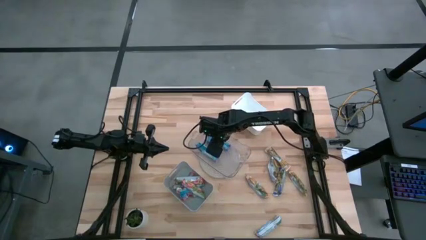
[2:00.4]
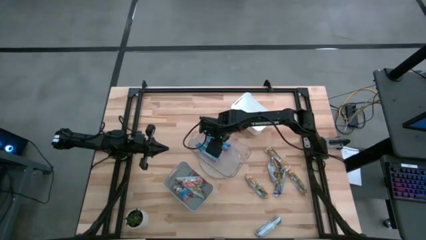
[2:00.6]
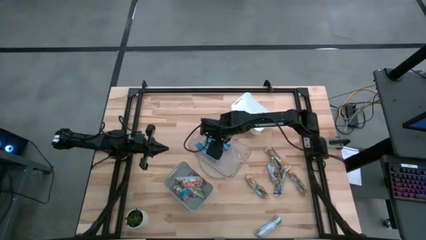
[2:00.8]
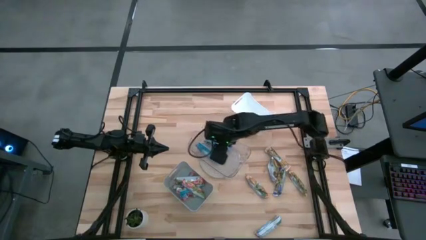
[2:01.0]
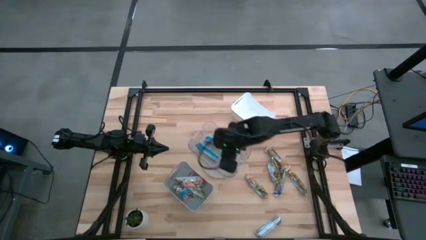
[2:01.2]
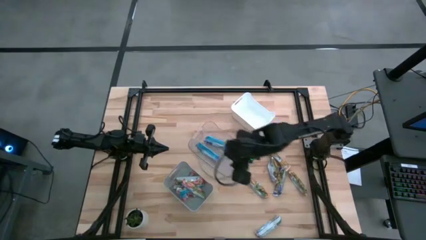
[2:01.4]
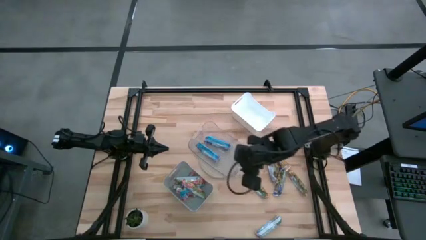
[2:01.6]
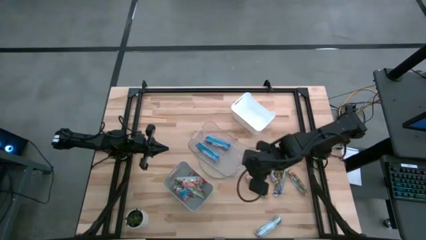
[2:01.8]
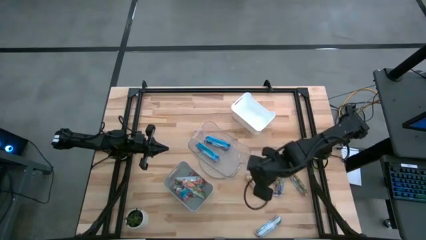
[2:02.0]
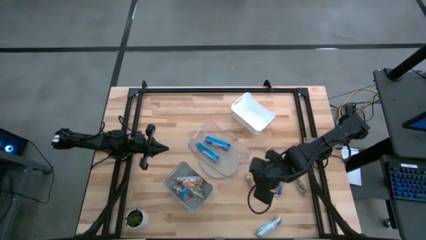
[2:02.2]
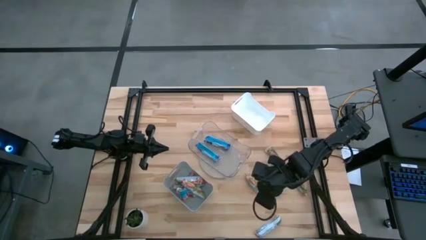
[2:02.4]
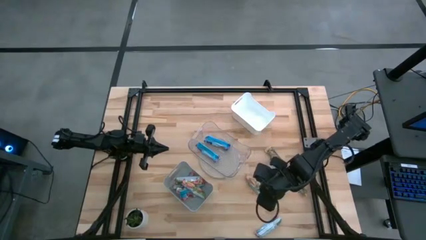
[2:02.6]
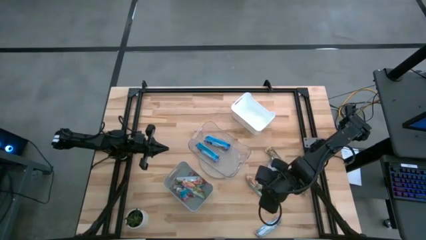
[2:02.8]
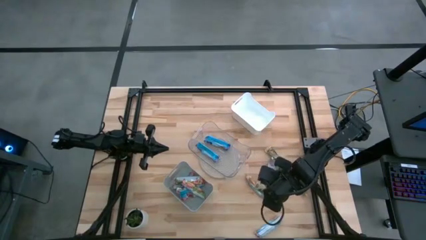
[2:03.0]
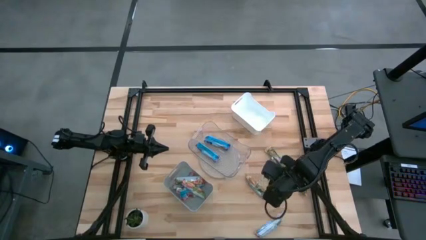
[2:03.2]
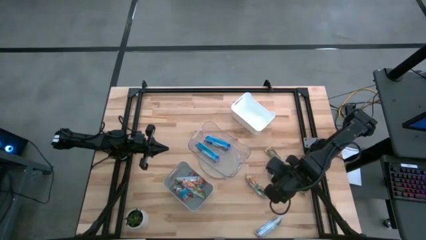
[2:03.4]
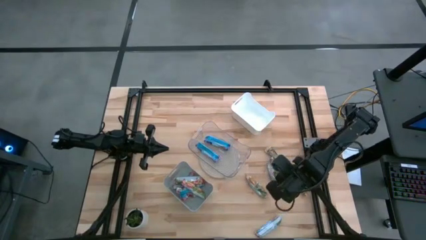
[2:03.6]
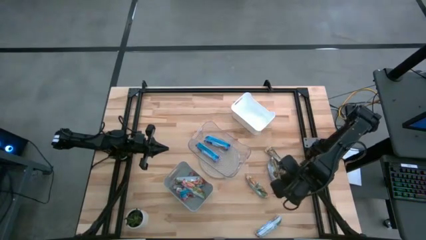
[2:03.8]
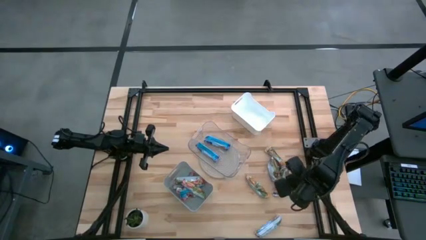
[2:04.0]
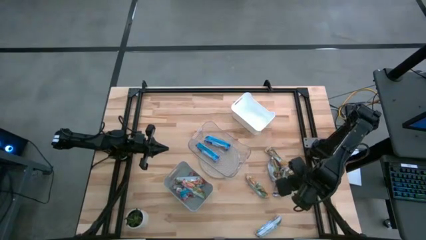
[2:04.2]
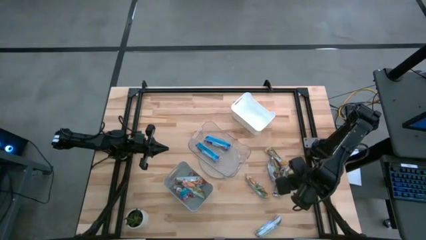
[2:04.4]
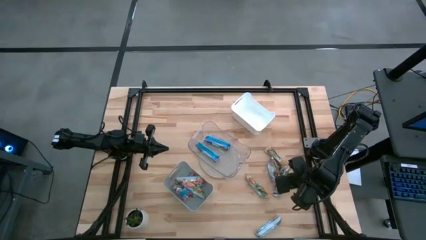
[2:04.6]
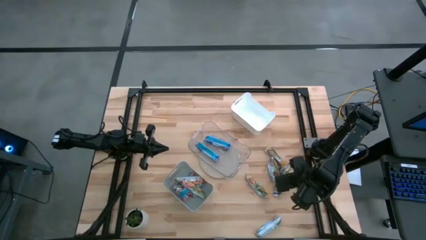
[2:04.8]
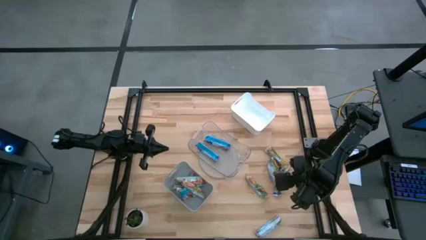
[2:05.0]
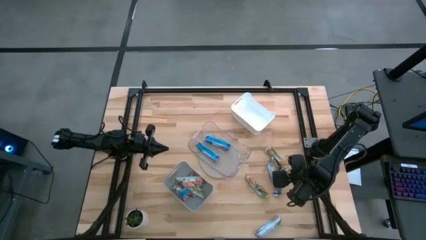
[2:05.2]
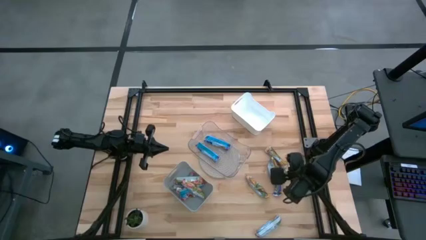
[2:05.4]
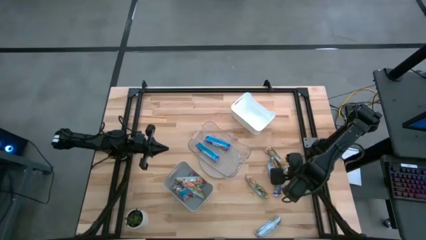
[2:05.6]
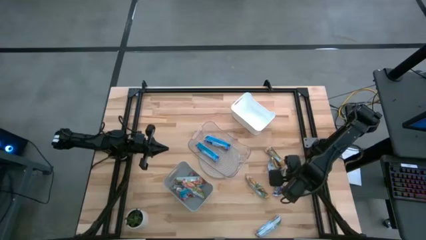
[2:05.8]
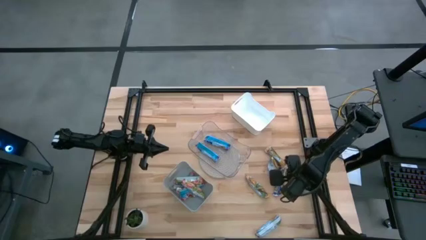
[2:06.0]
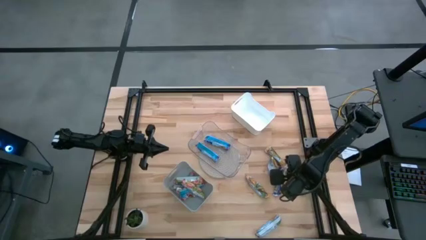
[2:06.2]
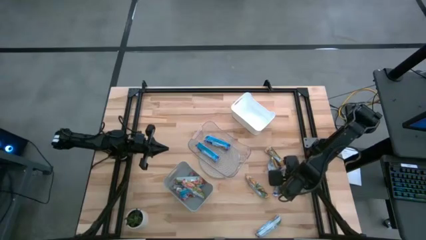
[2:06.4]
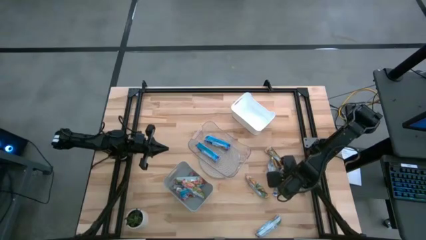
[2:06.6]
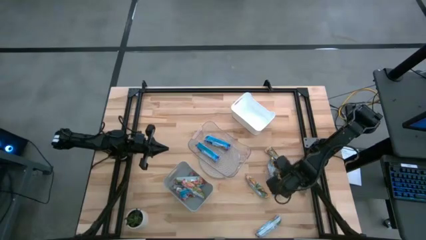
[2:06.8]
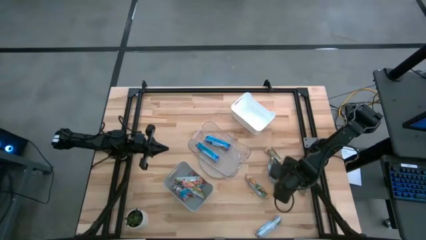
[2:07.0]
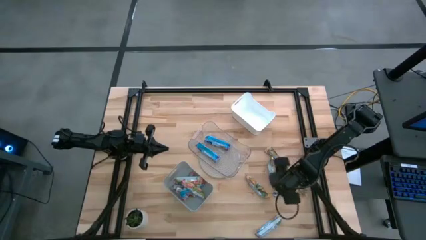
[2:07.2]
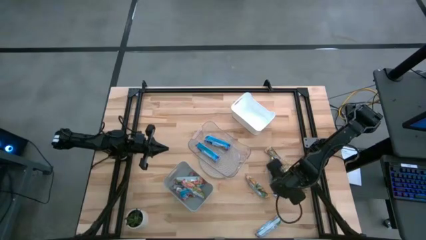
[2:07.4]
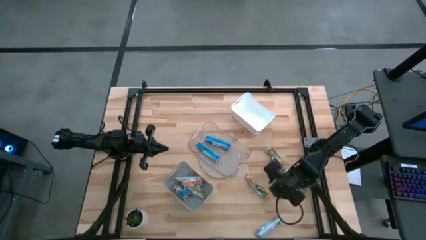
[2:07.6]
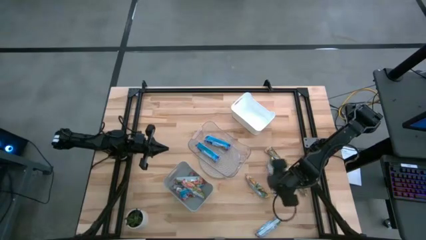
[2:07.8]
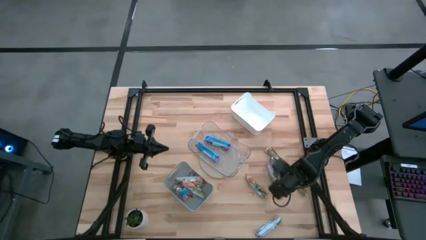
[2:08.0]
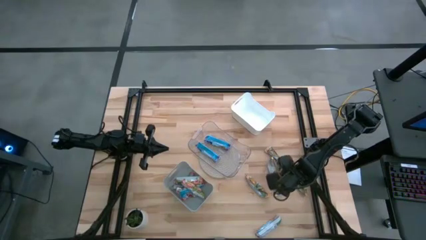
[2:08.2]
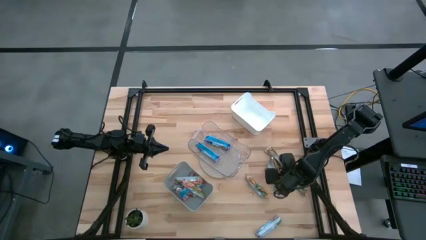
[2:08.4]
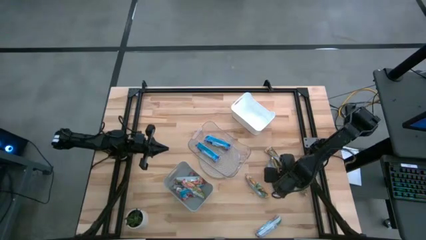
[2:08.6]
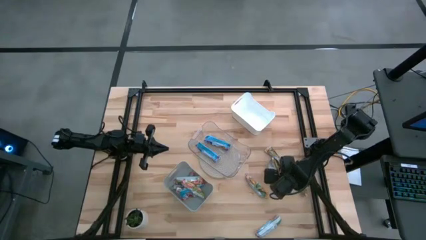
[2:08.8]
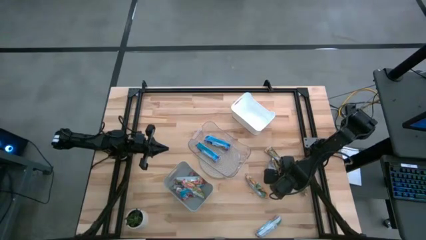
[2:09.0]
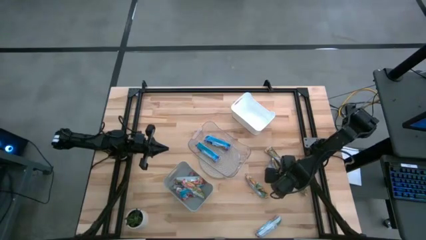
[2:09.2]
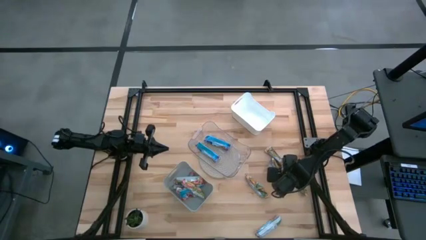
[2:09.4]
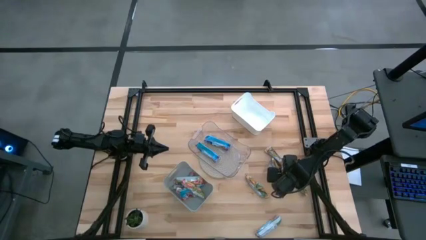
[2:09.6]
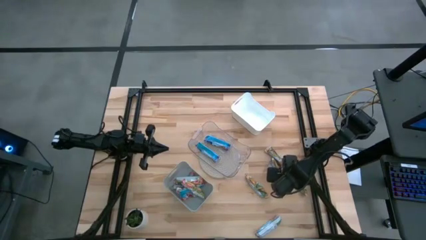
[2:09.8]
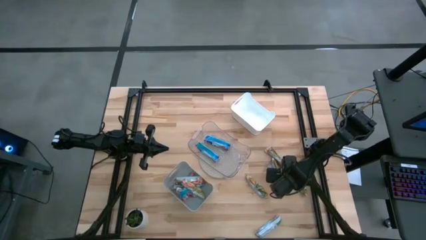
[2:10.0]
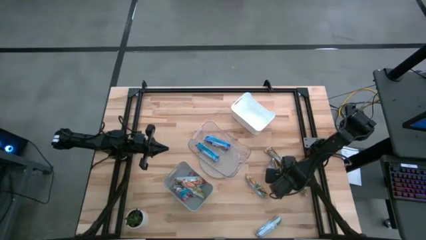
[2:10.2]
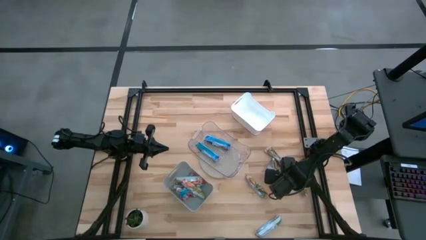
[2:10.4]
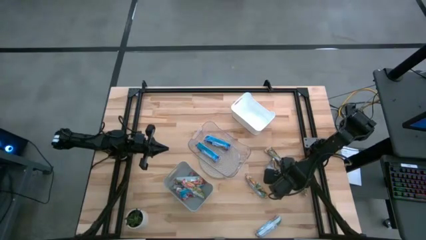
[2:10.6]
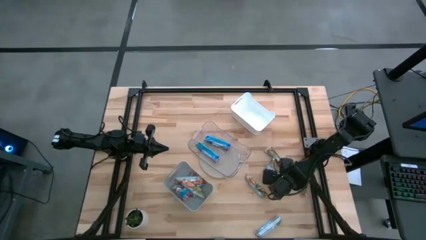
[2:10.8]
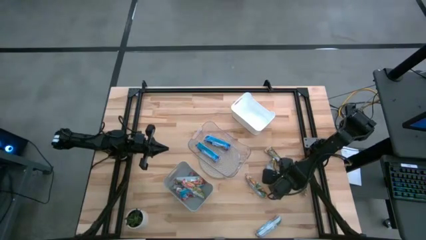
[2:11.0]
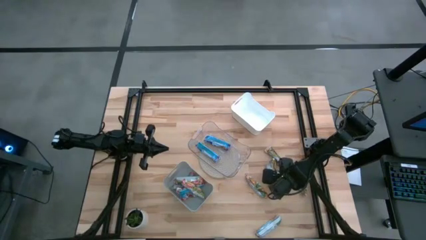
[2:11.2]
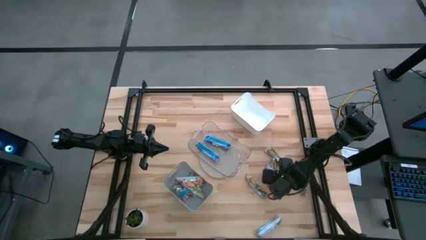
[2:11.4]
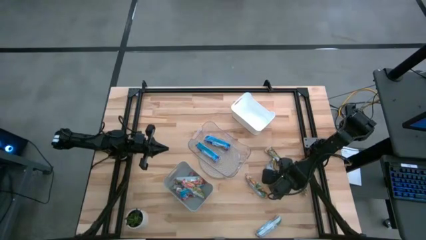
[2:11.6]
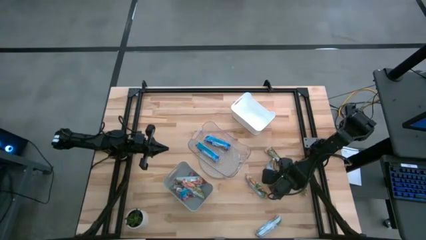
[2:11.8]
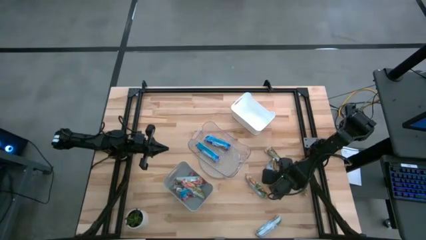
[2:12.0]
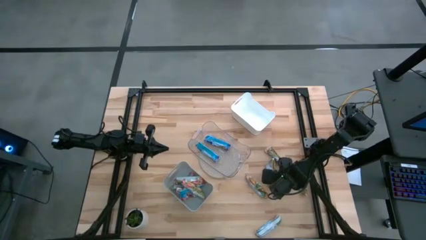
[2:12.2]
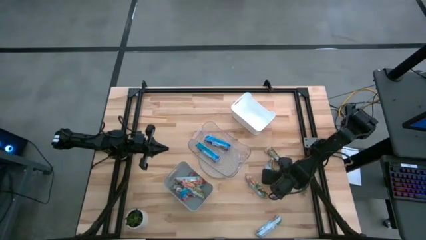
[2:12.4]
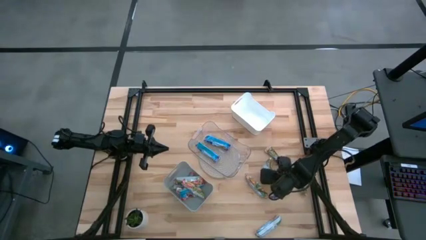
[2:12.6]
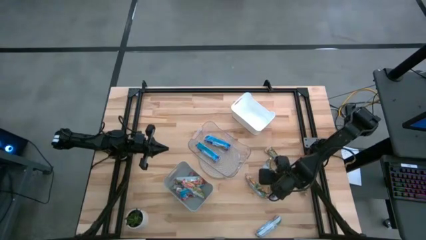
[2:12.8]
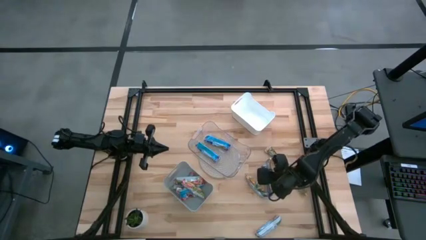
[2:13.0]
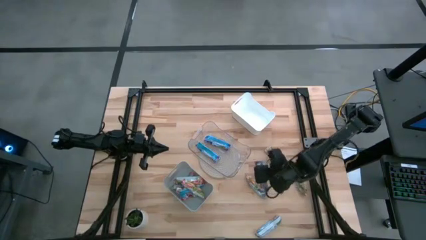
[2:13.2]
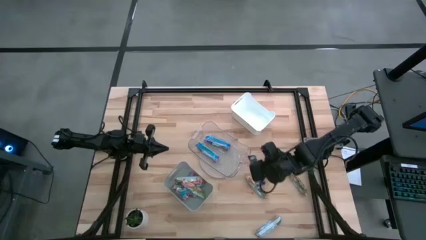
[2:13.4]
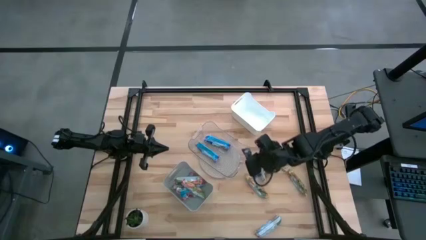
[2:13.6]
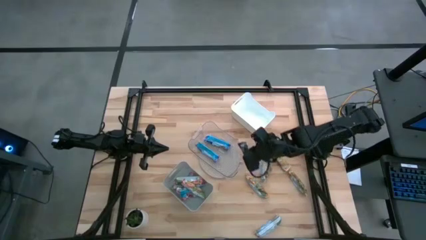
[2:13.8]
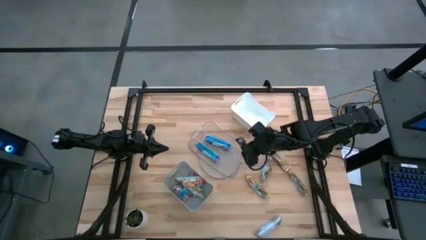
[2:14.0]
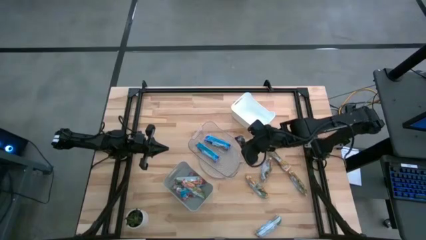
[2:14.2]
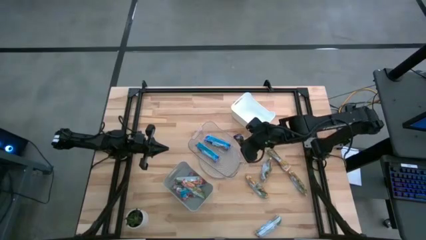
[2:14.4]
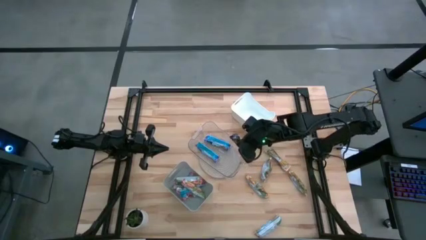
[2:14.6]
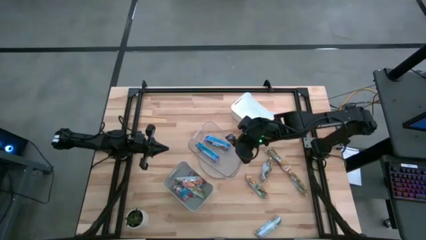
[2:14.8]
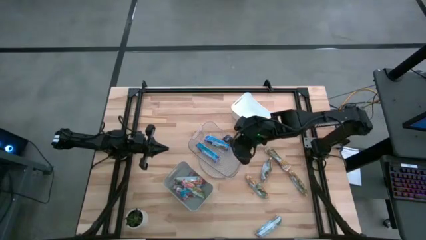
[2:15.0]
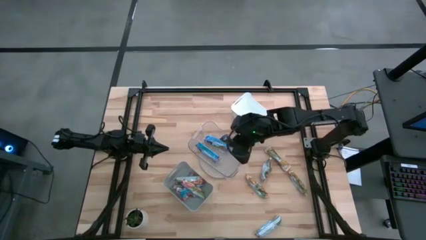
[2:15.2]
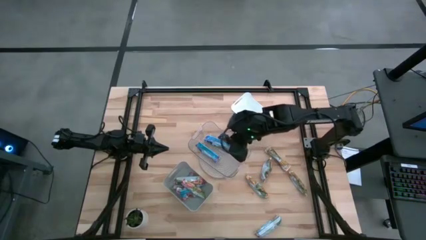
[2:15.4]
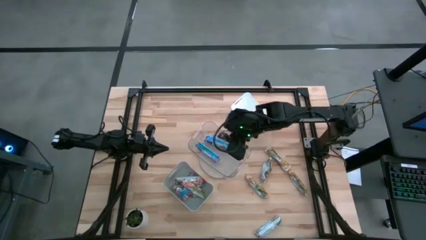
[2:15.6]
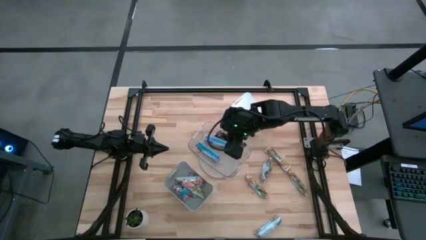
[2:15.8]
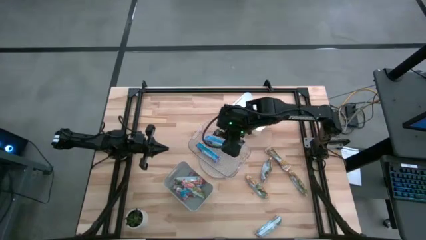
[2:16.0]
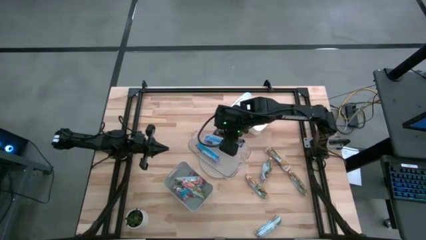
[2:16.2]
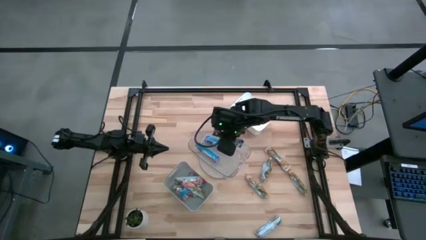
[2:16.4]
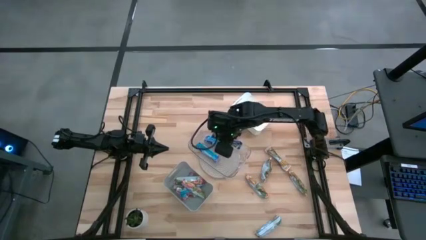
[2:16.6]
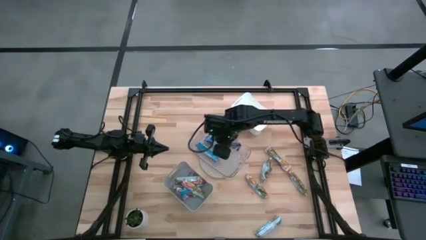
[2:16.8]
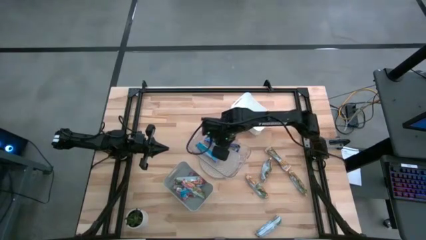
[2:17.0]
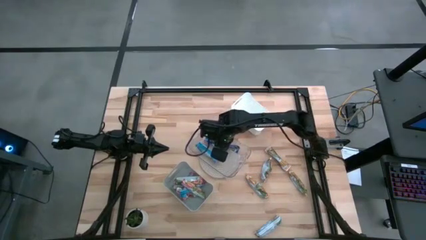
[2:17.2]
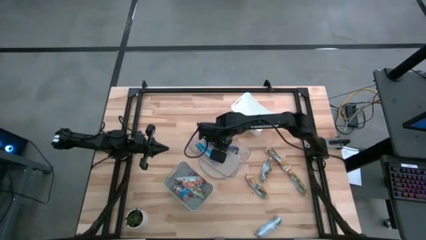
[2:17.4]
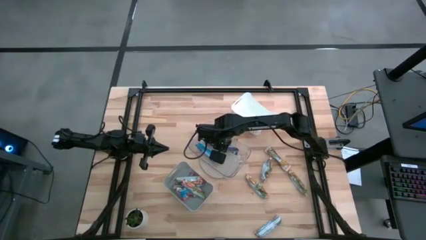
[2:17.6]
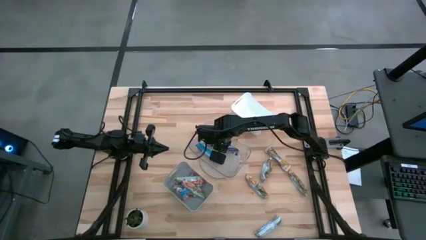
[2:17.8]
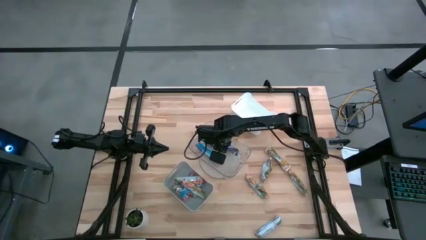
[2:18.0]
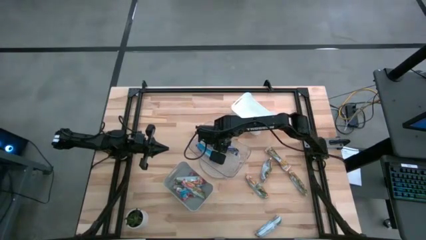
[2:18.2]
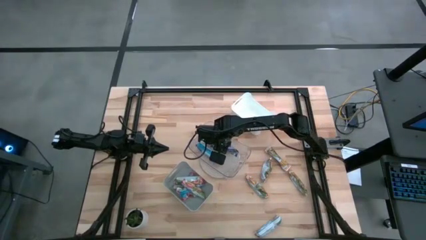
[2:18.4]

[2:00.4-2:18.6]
Task: Pick and place Granola Bars by type
Put the blue granola bar into the transparent bin
